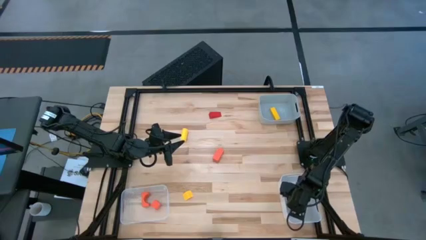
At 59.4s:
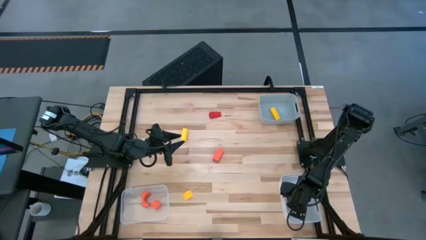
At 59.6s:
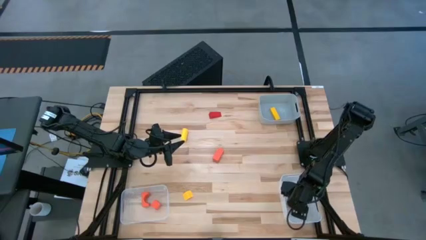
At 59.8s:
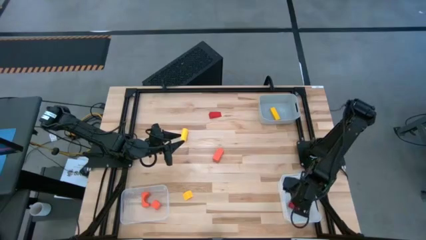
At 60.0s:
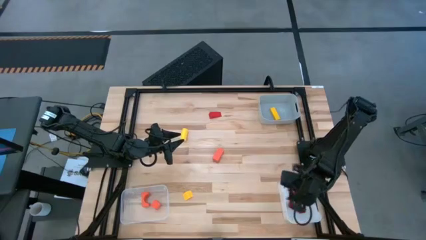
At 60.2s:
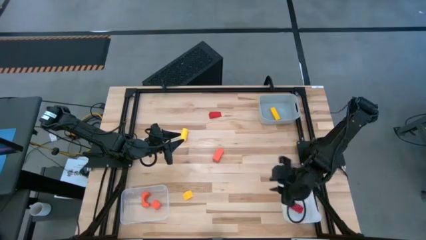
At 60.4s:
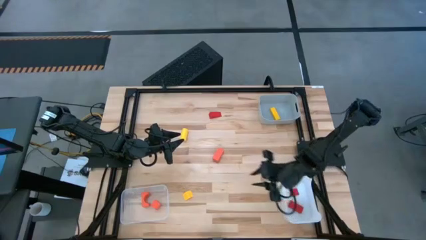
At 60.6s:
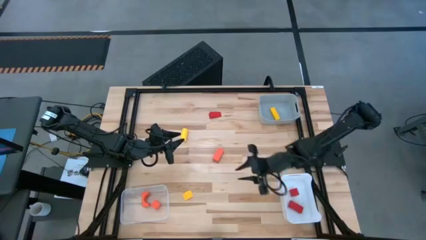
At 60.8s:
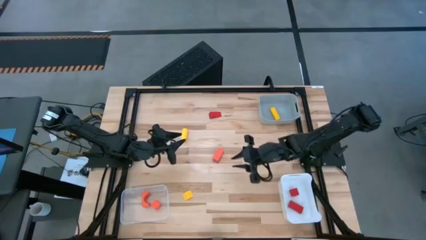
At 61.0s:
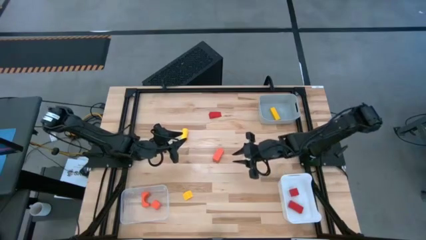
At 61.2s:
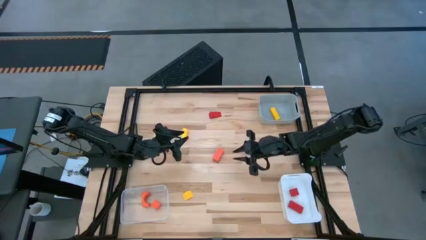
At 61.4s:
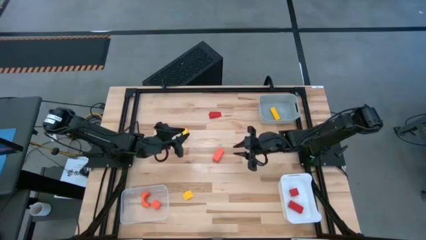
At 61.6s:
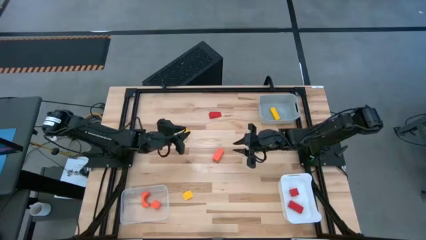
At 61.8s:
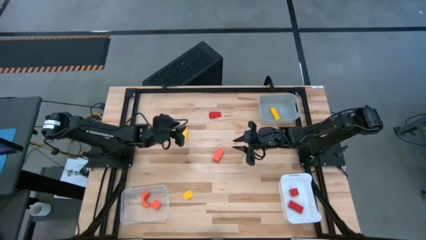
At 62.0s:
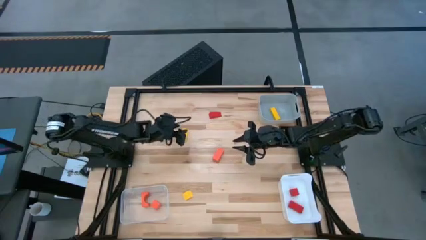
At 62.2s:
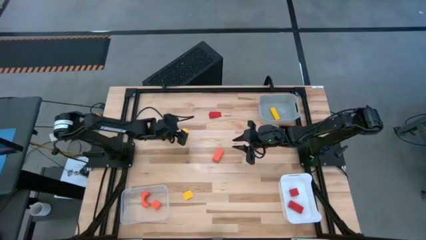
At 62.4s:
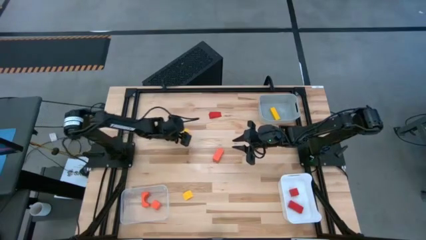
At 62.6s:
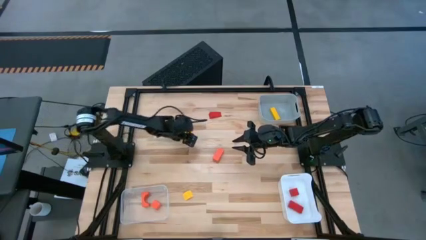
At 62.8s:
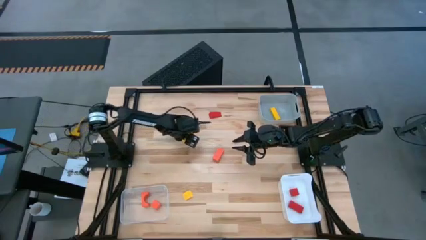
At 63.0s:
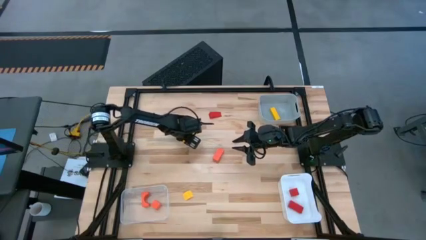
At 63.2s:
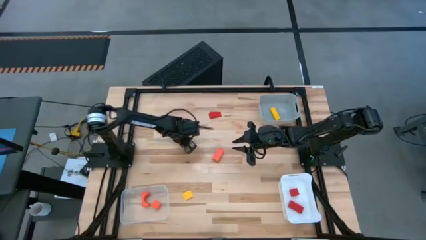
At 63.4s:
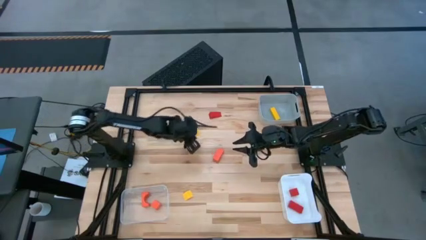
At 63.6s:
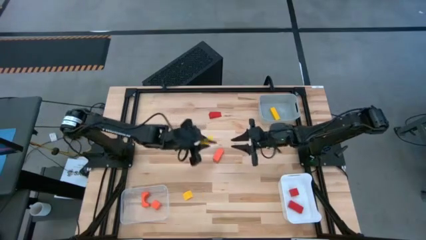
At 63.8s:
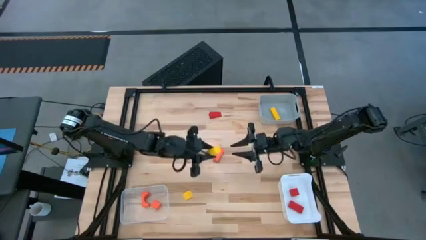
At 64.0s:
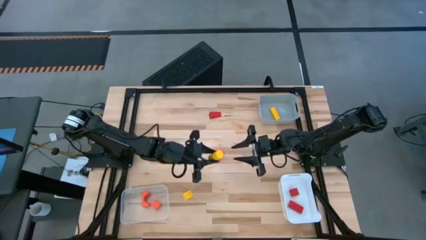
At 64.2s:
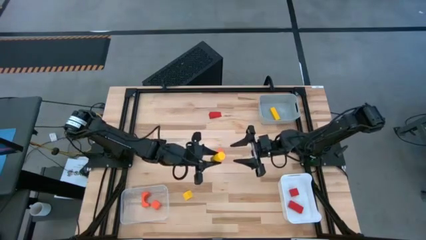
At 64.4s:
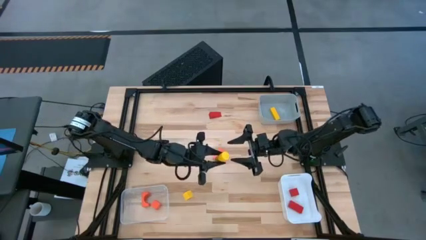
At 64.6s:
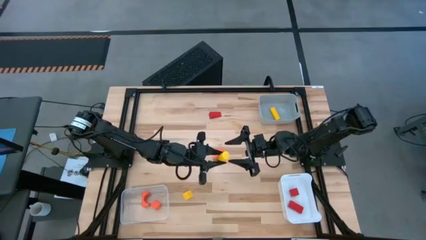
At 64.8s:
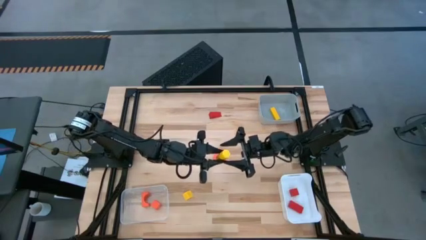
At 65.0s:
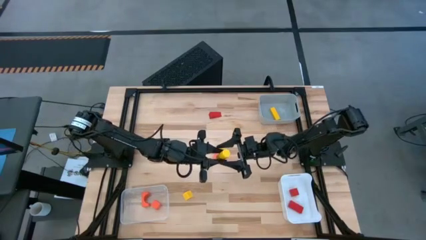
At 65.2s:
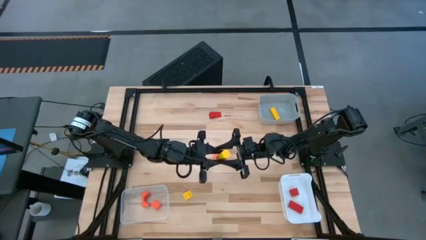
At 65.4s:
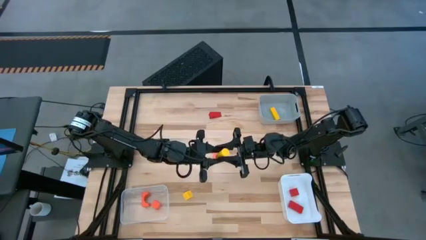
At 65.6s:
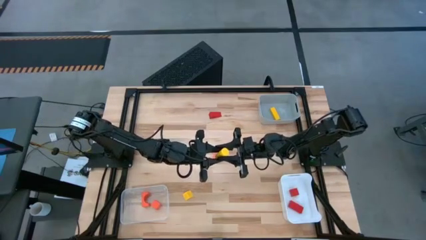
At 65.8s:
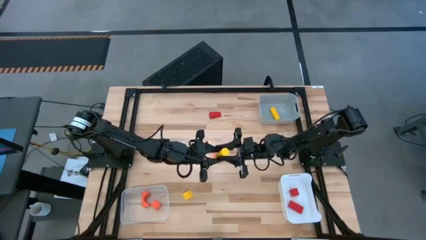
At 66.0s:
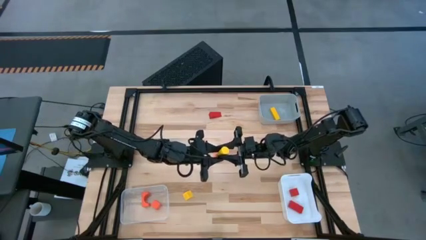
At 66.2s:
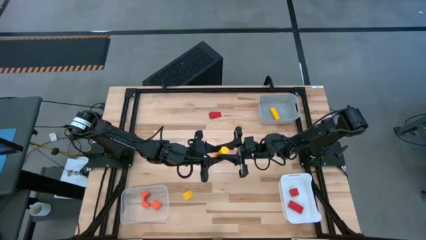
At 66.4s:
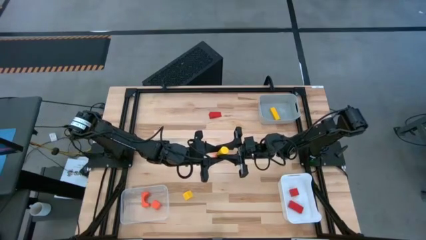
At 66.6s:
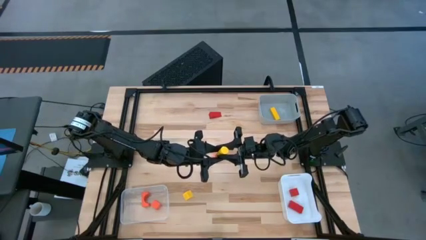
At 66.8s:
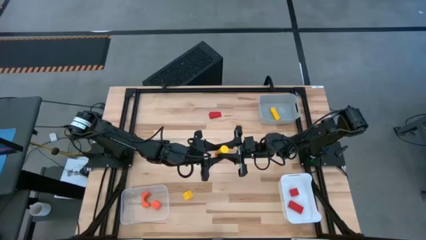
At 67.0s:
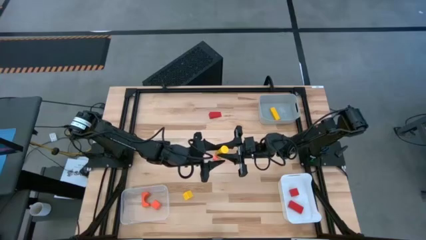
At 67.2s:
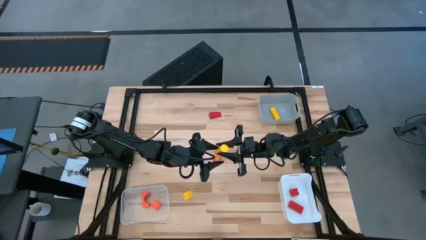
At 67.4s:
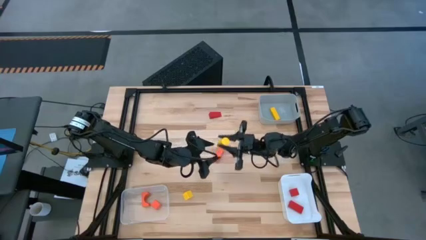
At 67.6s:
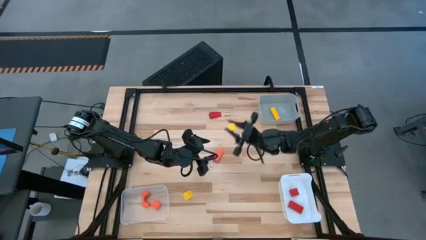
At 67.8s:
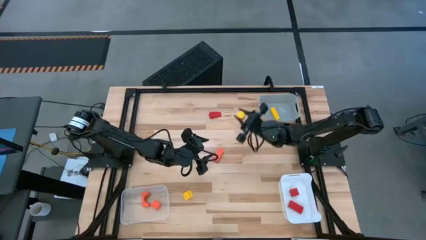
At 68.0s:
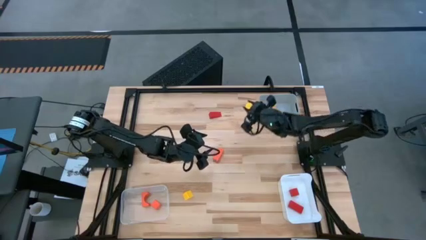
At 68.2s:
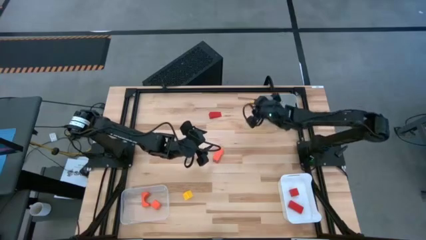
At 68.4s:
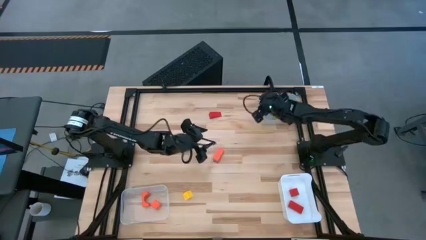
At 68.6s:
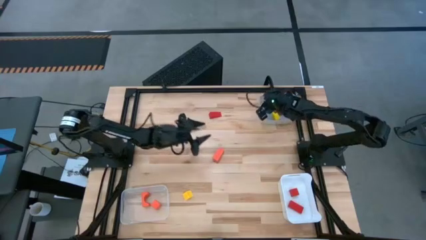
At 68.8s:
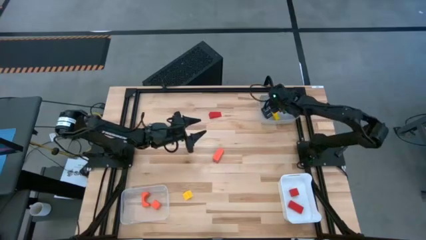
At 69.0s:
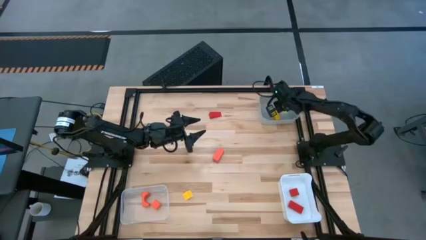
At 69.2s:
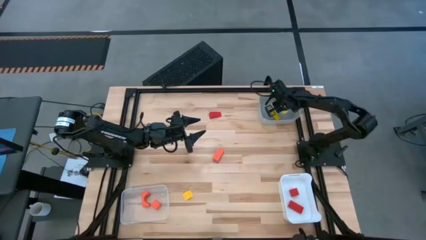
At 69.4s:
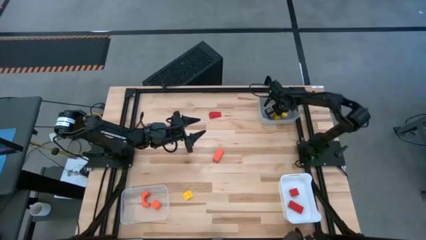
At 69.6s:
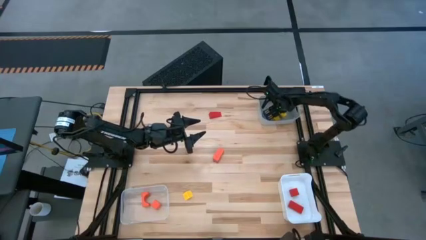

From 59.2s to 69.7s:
Task: Sort & place blocks by color
Put the top yellow block into the gray bin

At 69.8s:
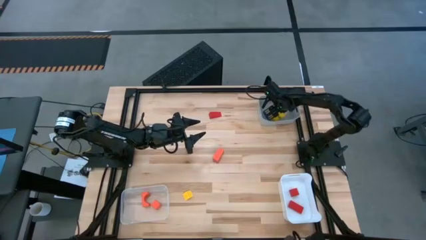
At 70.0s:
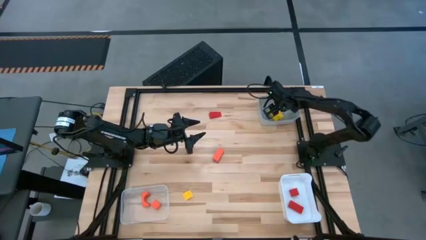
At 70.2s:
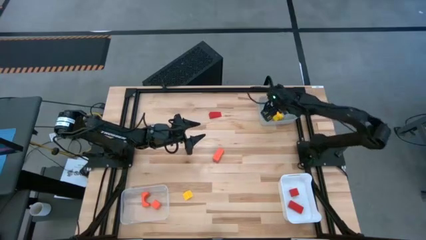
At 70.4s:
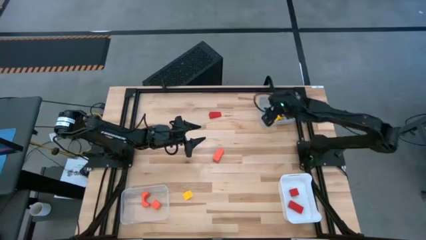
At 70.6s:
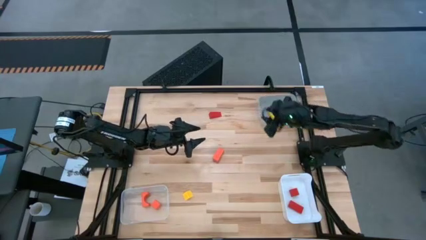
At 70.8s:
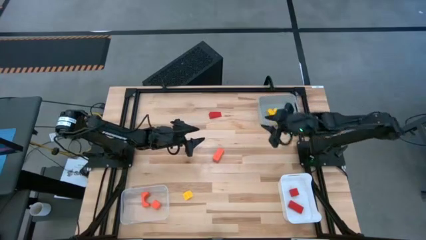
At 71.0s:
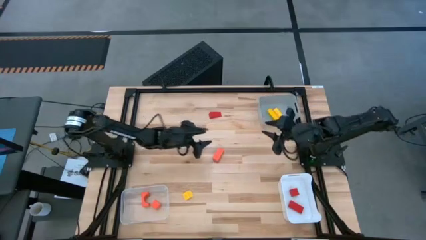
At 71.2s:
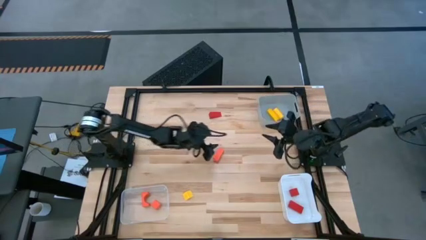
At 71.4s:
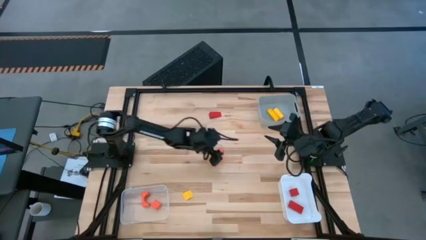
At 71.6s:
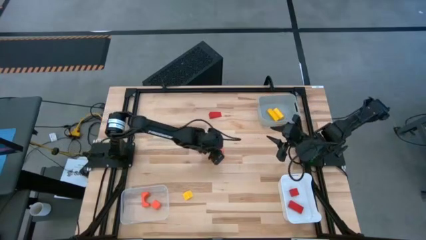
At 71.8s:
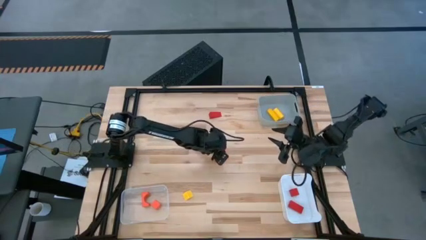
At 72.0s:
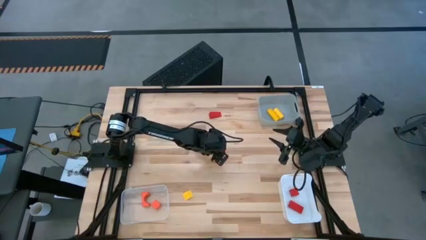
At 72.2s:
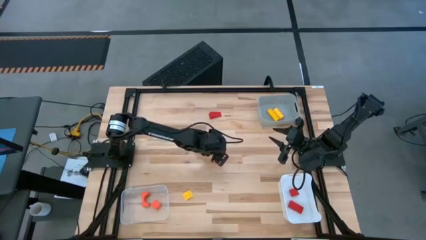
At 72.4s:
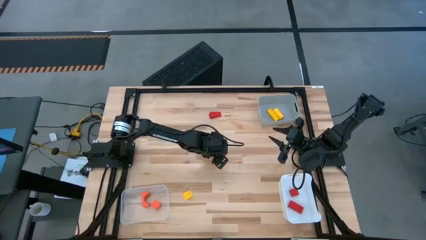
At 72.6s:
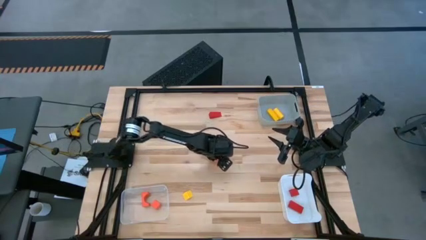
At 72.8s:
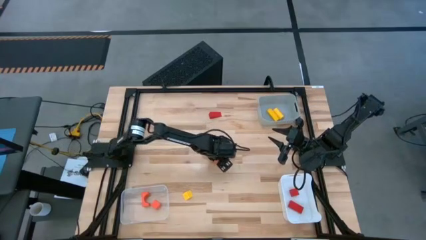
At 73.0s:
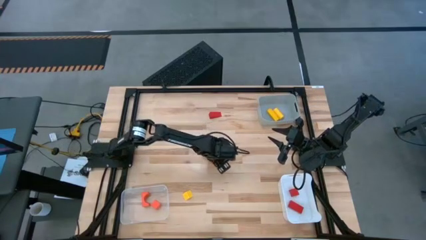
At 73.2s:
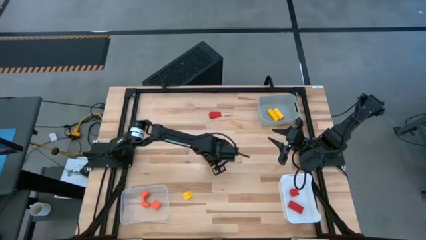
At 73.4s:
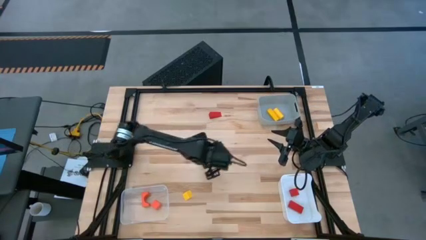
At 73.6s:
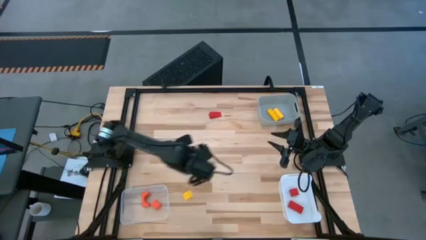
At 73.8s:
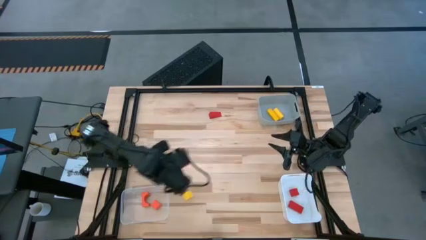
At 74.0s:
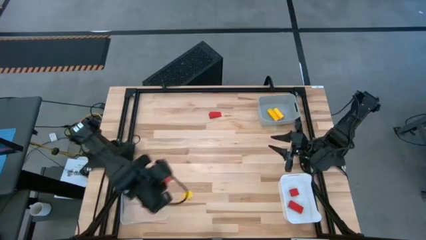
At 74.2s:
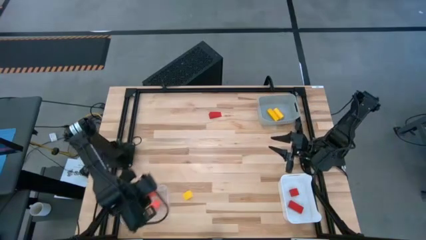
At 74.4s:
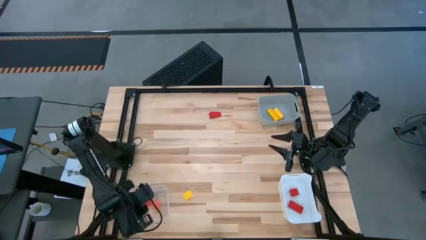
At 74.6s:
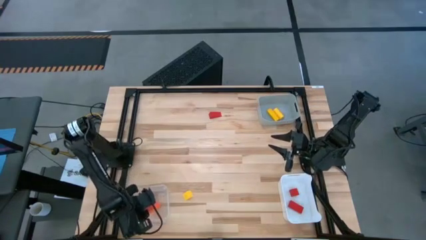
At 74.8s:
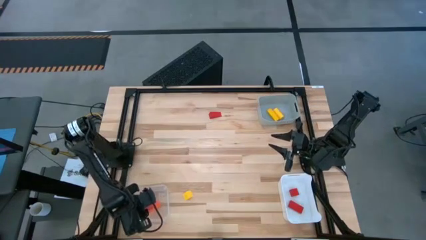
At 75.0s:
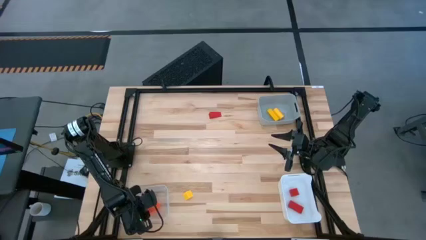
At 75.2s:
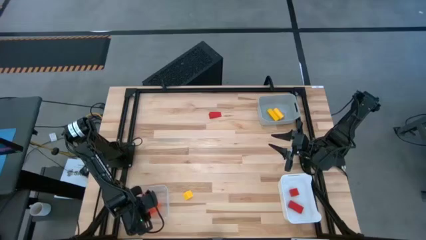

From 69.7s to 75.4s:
Put the orange block into the transparent bin
